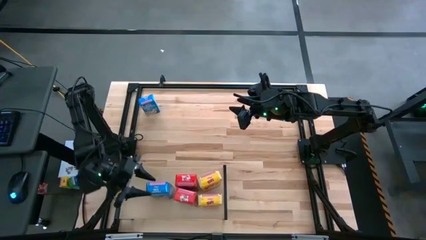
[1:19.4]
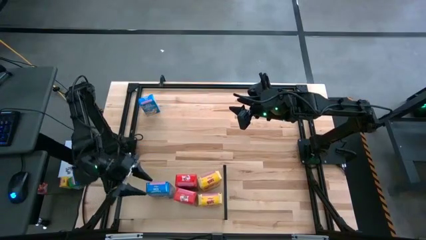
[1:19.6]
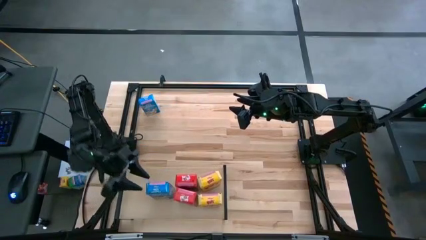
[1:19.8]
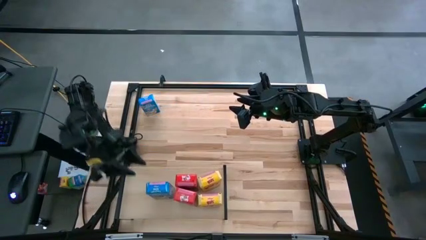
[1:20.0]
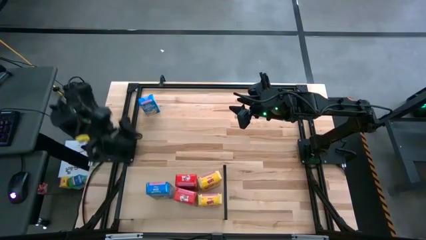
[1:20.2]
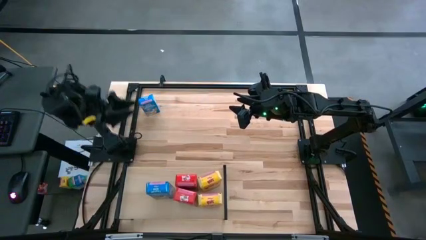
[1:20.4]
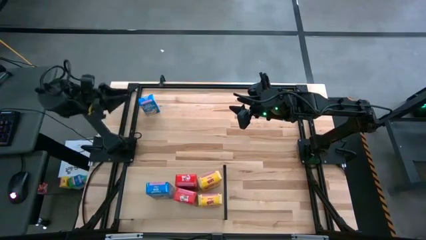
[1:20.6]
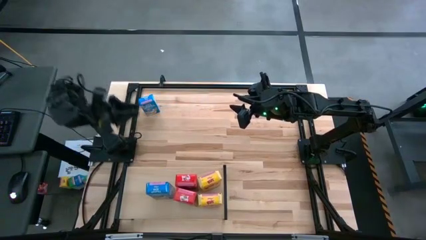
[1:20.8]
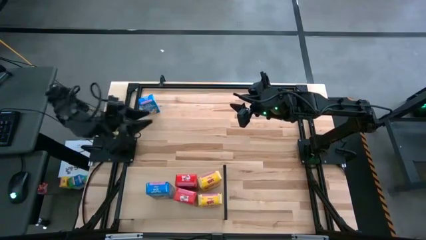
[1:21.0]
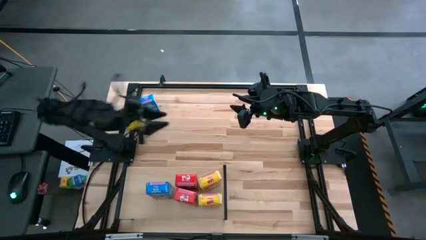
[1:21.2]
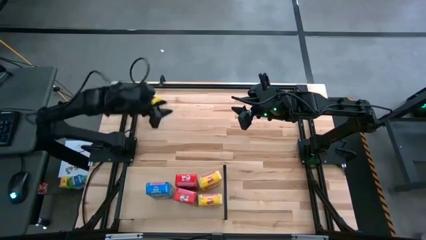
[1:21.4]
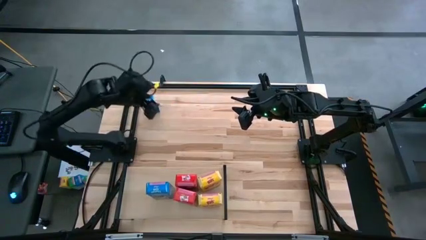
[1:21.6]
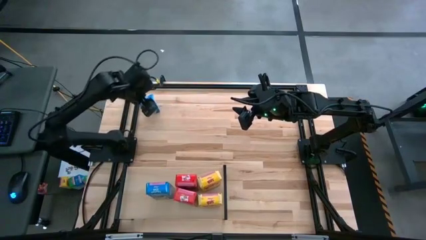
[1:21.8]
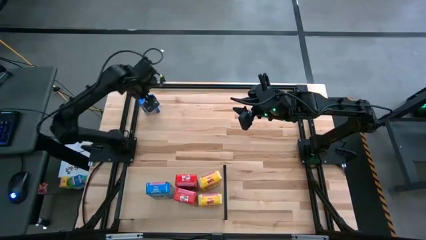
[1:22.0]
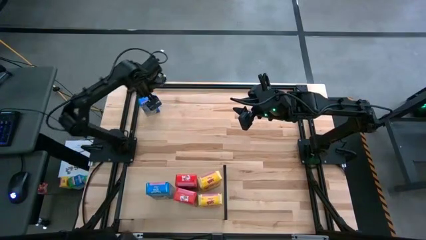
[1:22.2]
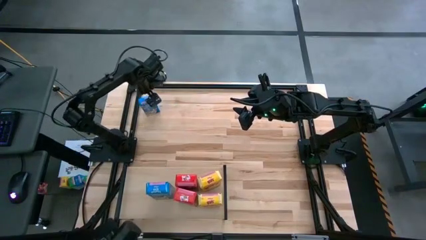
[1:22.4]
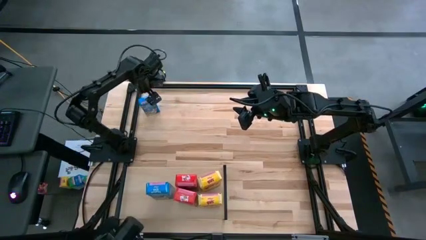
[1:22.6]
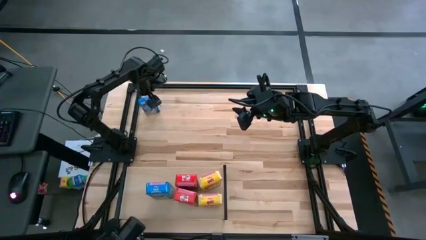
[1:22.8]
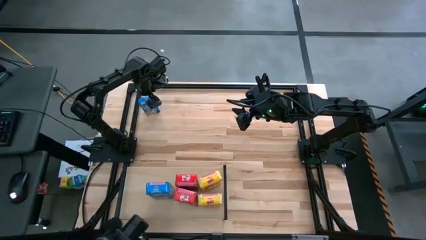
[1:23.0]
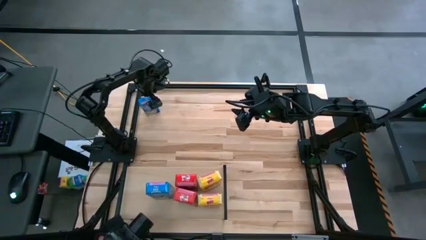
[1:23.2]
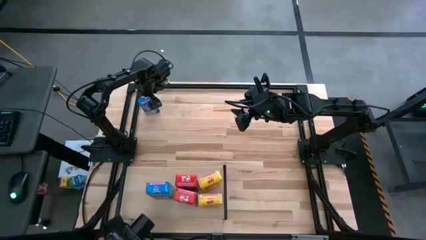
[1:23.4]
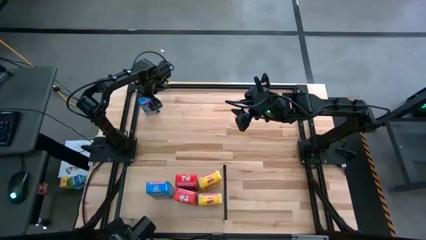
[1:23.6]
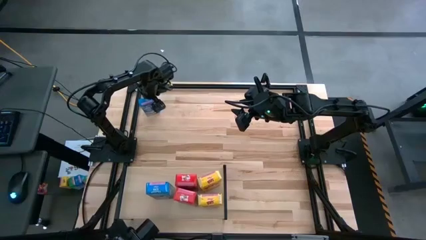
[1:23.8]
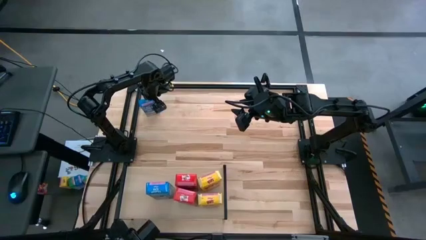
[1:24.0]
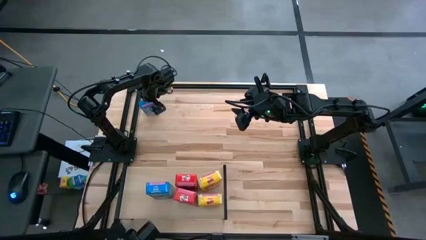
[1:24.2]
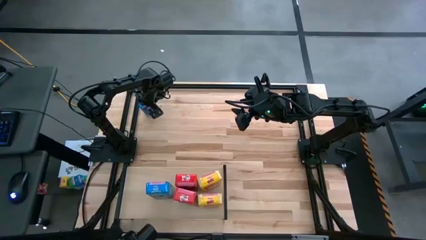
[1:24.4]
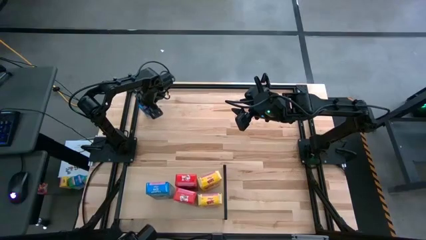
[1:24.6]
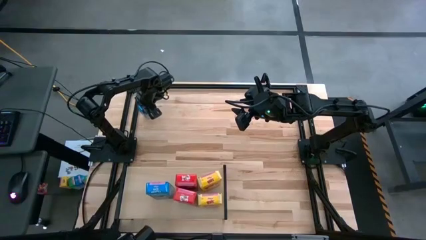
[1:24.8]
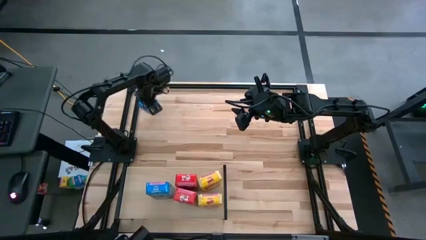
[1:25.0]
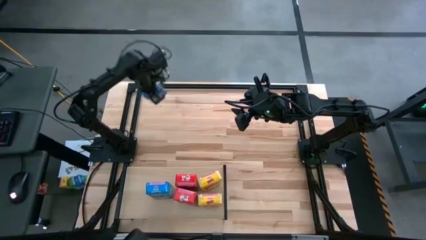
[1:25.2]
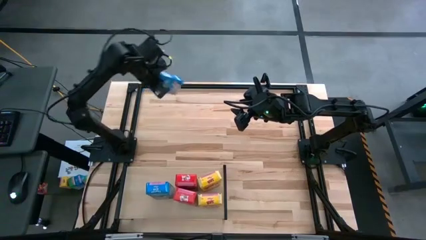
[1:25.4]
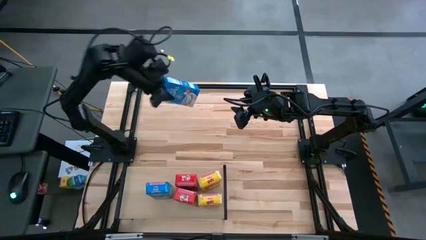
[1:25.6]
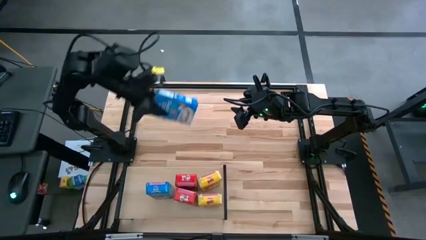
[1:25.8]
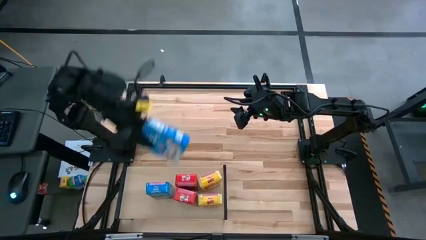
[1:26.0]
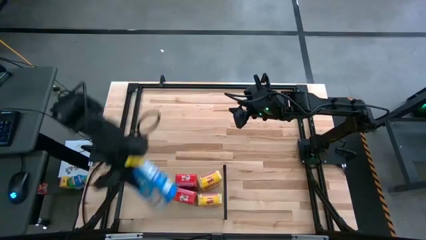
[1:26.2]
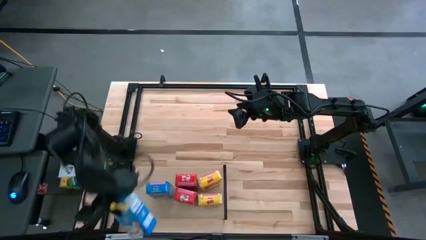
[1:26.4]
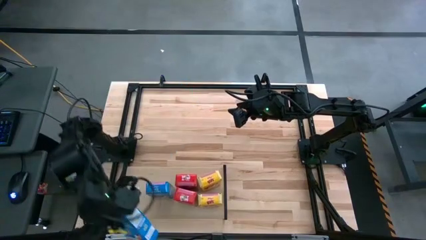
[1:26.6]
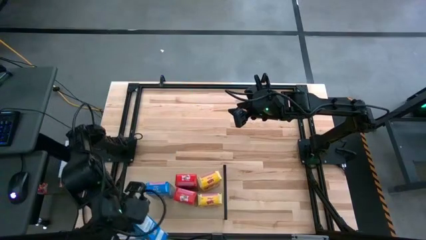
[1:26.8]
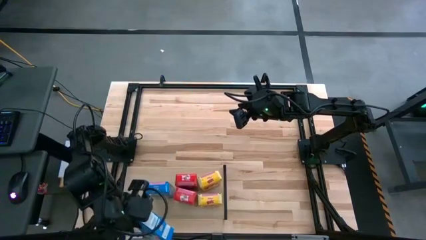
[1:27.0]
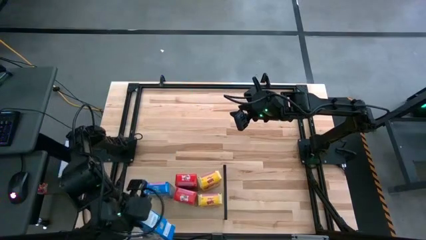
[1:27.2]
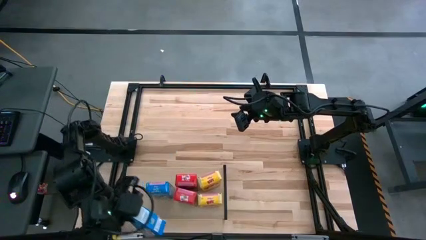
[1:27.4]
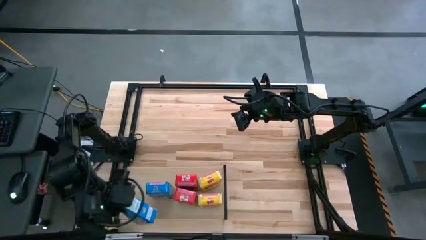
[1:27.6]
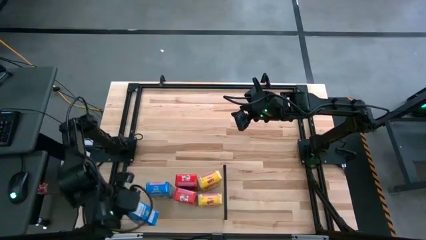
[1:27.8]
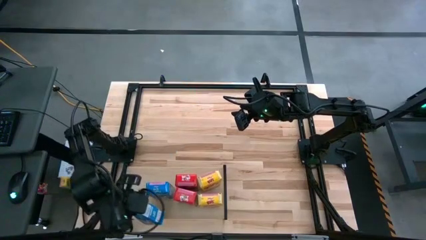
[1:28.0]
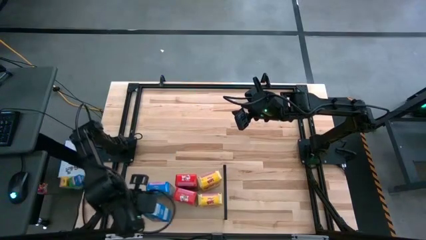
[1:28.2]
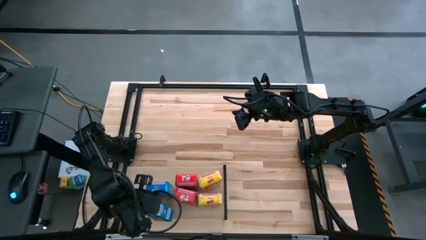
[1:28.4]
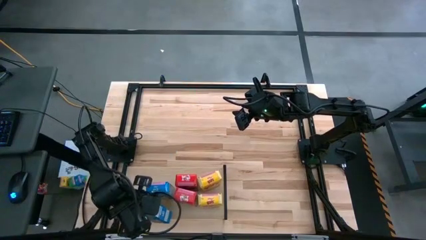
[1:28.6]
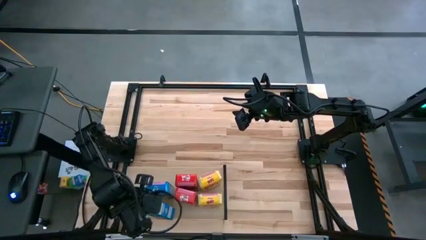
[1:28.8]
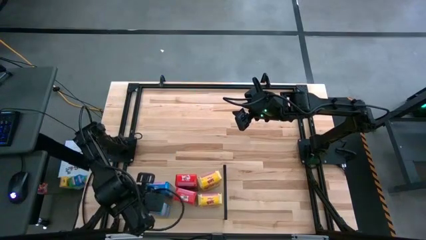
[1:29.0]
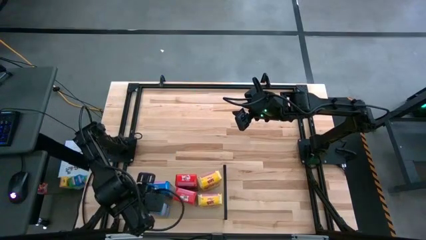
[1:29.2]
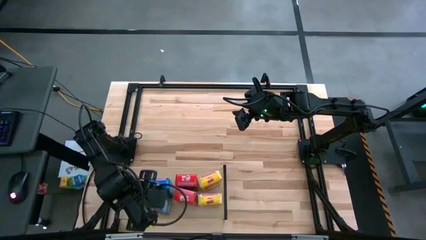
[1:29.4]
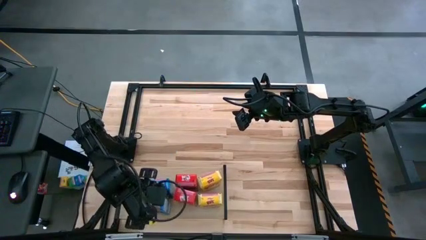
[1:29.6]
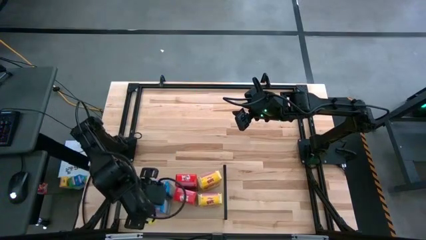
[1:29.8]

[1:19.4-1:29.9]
Task: Stack cereal on shelf
Put the blue cereal box on the shelf aligned with the other blue cereal box

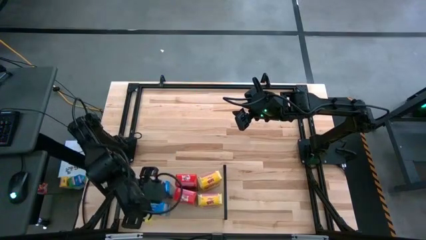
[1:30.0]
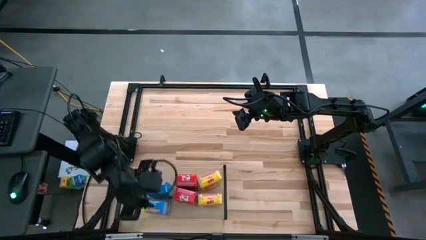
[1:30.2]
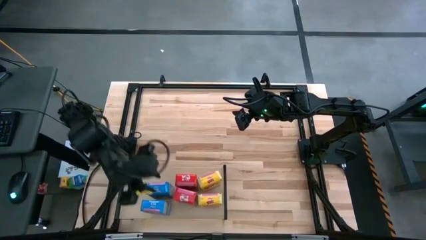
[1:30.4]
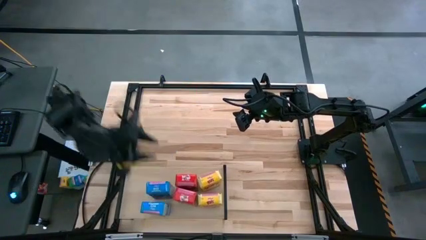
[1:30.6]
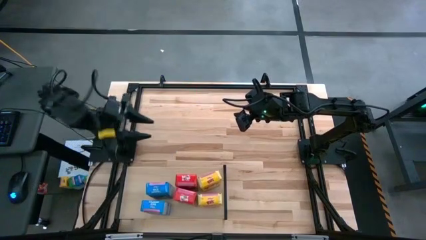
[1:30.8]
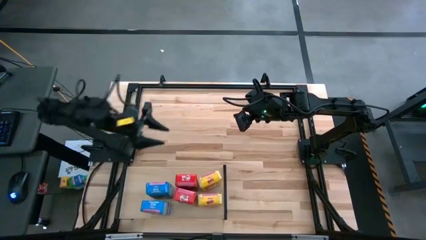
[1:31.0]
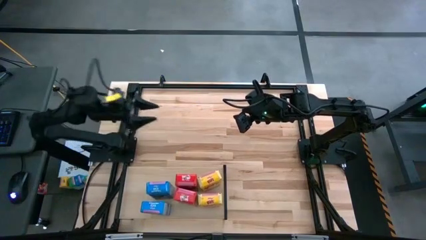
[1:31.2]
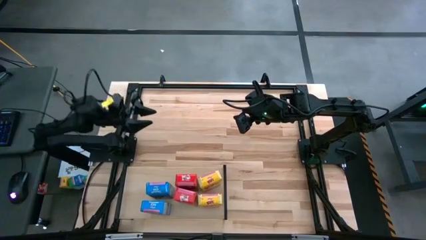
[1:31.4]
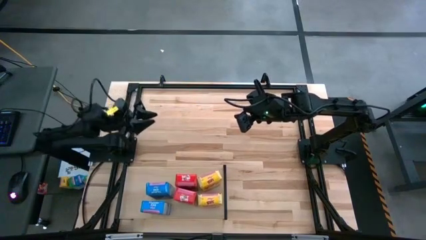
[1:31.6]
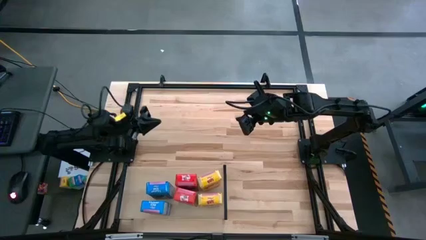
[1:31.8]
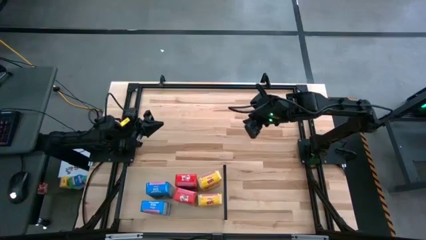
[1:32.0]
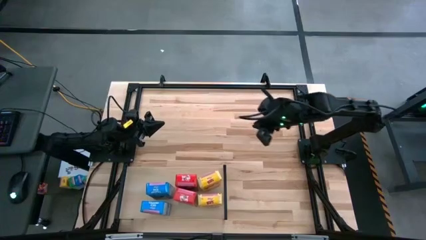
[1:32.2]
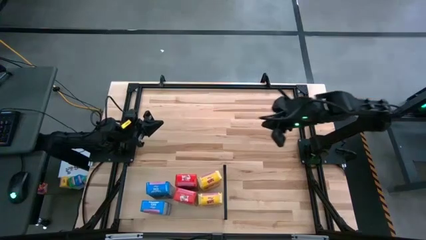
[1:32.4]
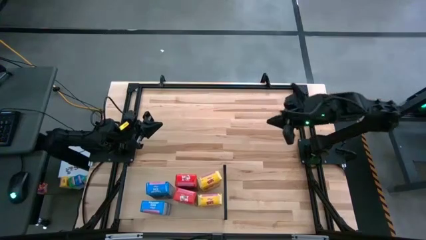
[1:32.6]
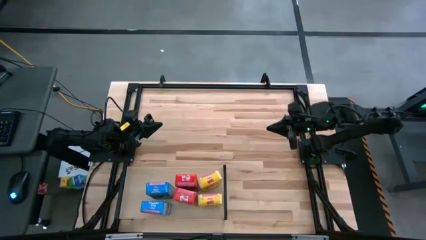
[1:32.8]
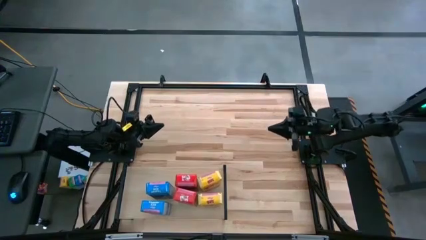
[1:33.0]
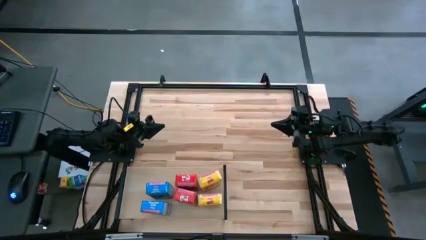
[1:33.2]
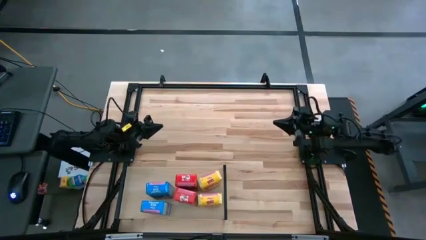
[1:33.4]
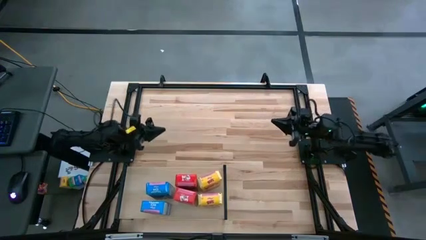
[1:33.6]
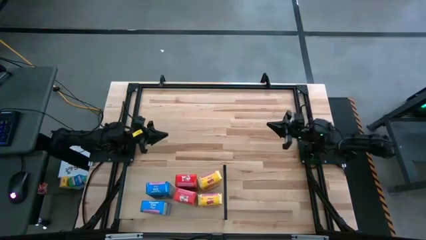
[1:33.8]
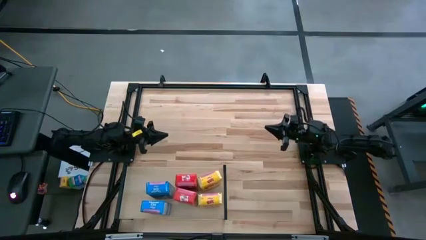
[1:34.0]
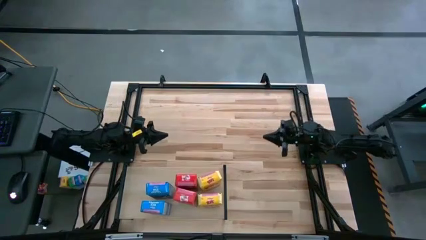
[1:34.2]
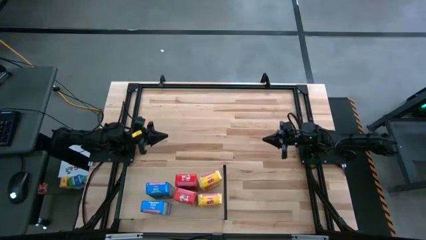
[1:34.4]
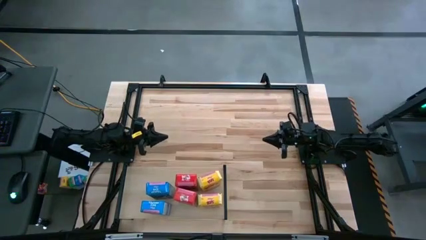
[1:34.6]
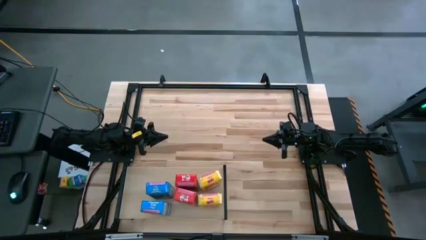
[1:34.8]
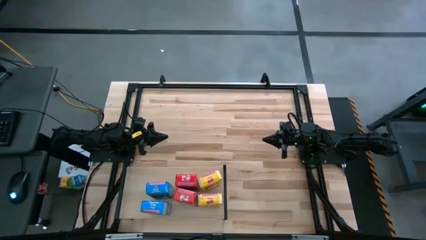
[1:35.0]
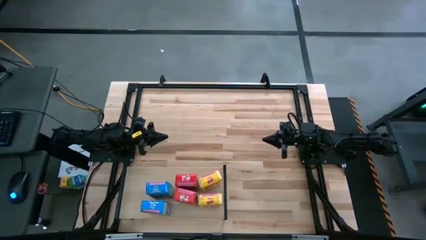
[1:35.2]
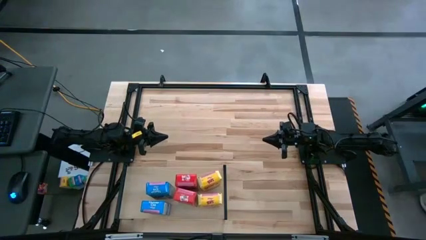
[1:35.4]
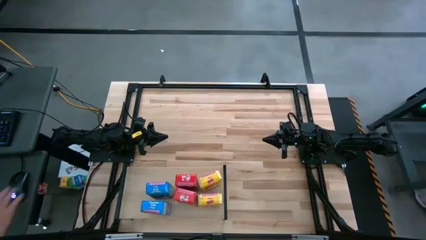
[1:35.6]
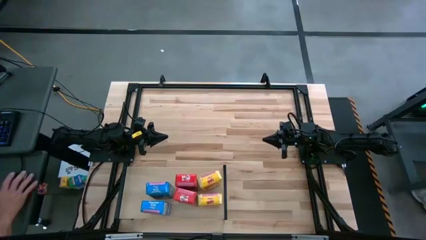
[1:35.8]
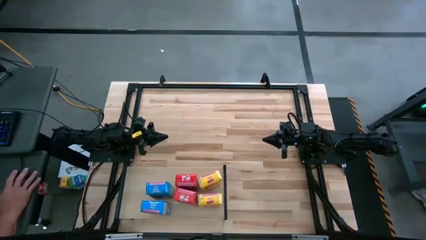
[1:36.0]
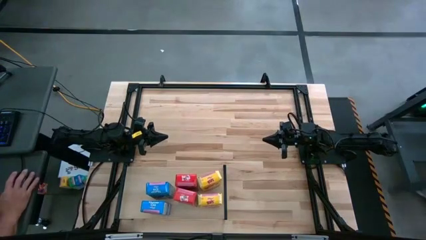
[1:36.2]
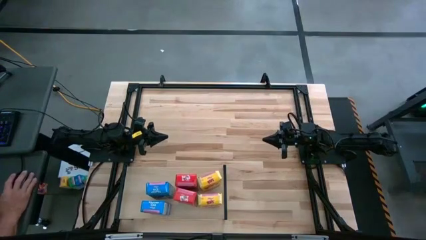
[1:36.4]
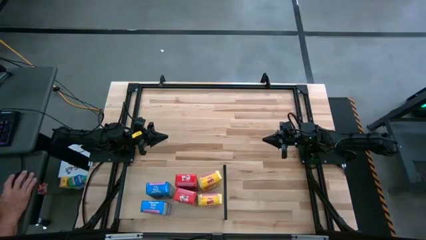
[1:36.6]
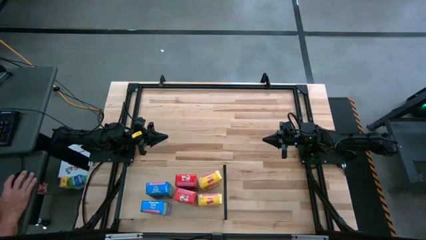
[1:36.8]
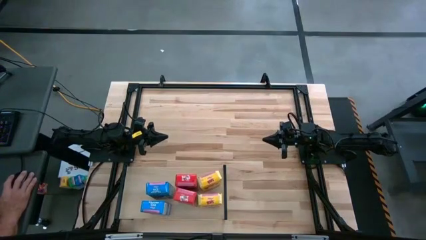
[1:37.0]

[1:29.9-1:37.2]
Return to Home Position
